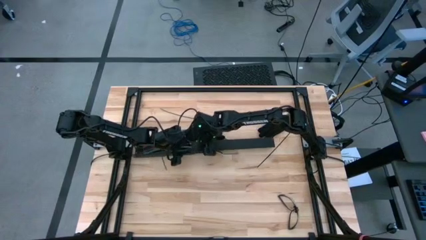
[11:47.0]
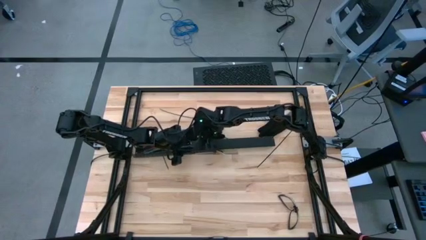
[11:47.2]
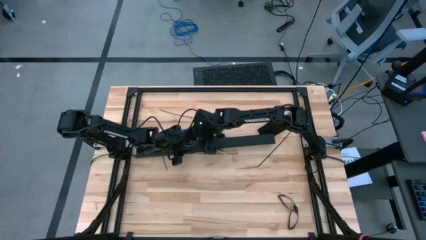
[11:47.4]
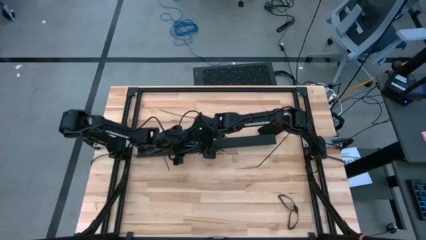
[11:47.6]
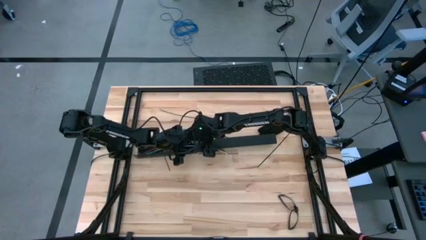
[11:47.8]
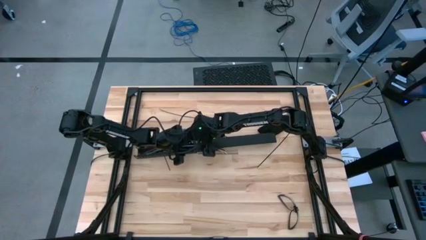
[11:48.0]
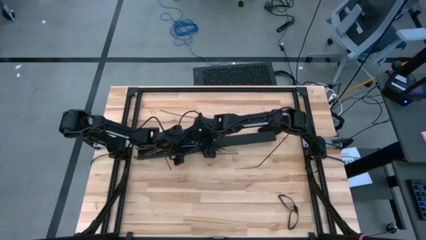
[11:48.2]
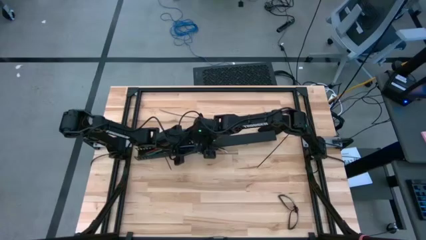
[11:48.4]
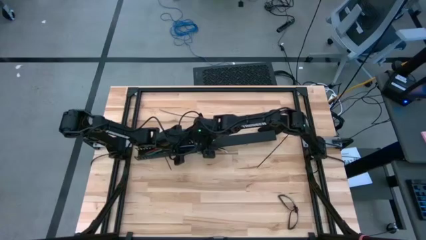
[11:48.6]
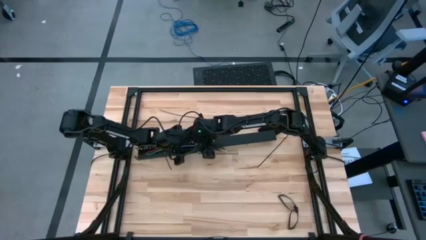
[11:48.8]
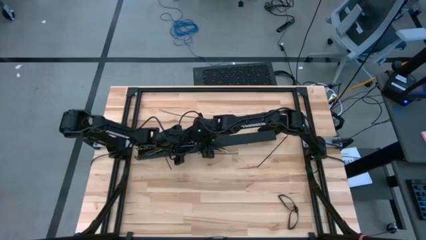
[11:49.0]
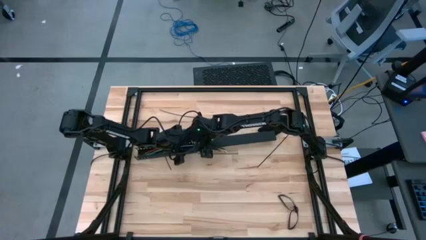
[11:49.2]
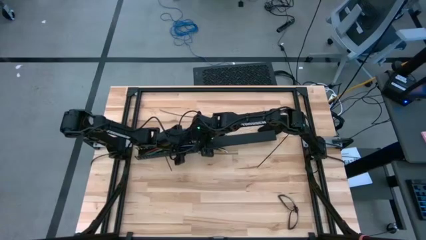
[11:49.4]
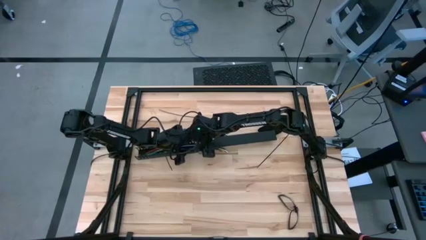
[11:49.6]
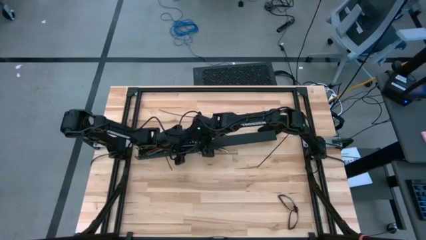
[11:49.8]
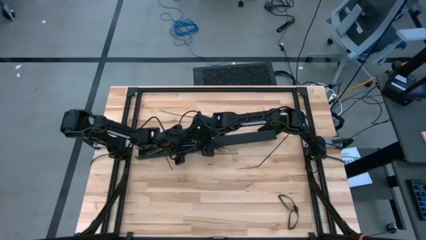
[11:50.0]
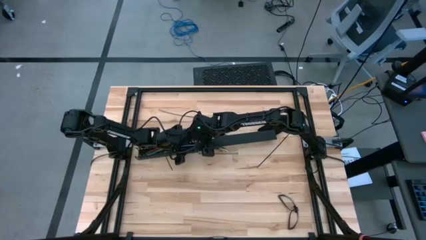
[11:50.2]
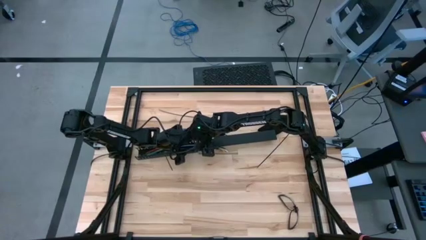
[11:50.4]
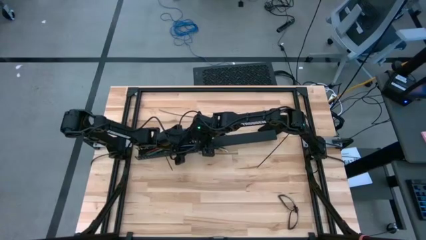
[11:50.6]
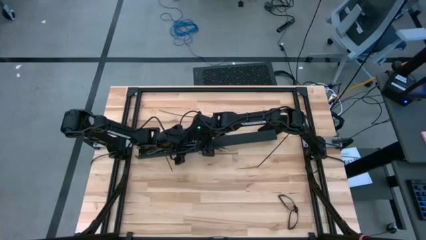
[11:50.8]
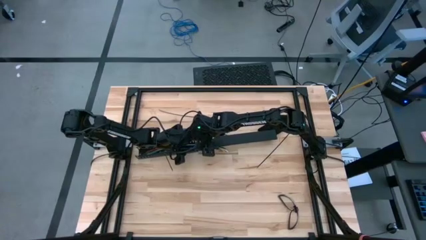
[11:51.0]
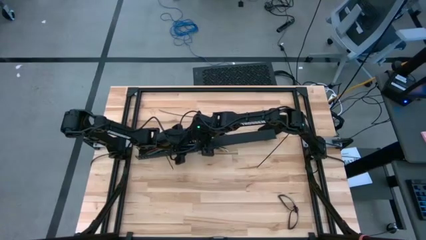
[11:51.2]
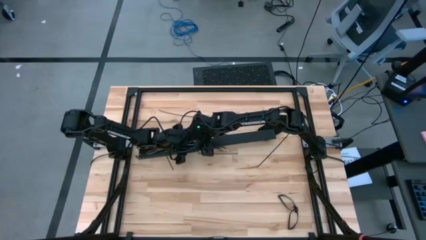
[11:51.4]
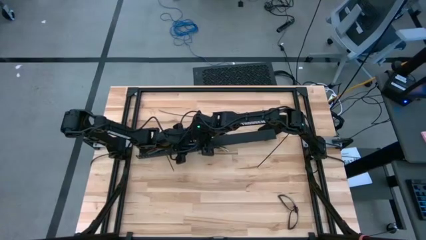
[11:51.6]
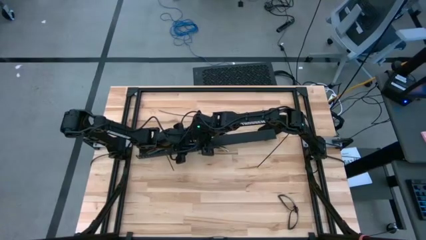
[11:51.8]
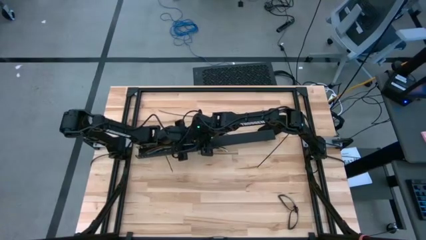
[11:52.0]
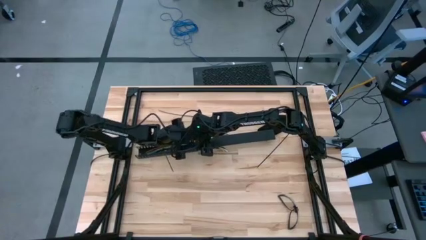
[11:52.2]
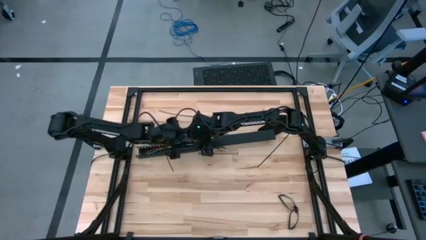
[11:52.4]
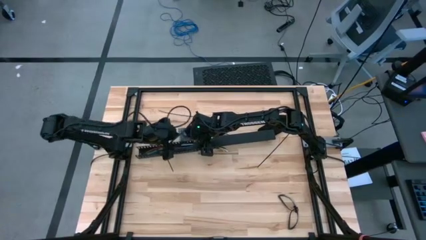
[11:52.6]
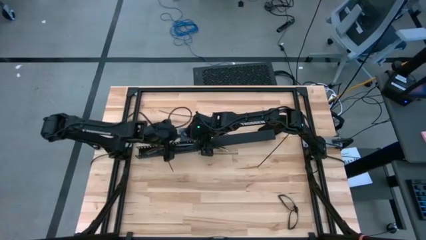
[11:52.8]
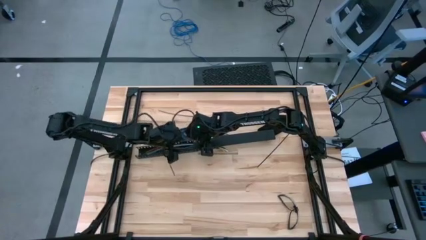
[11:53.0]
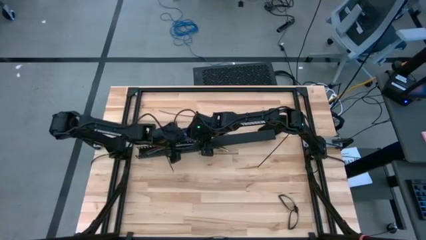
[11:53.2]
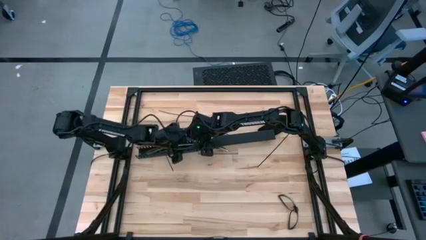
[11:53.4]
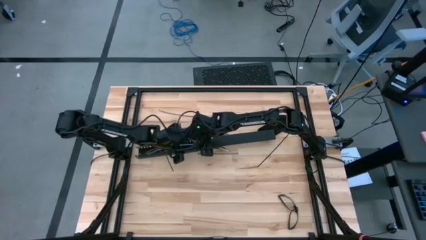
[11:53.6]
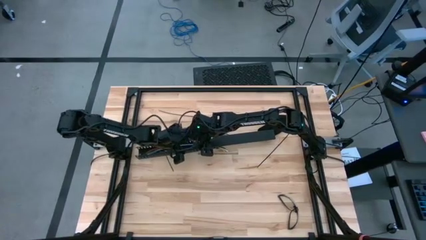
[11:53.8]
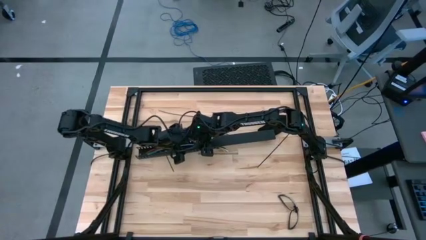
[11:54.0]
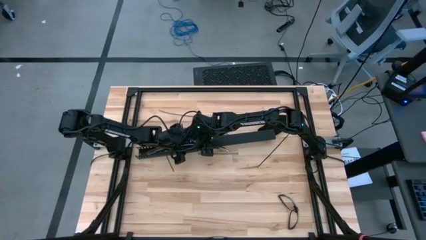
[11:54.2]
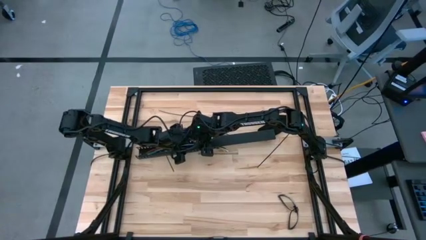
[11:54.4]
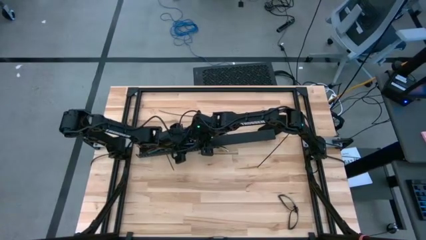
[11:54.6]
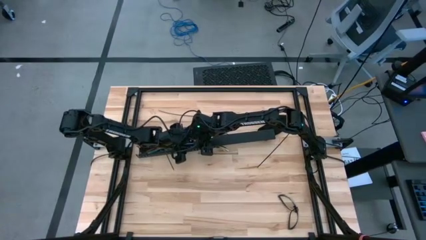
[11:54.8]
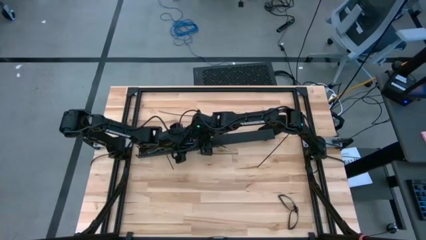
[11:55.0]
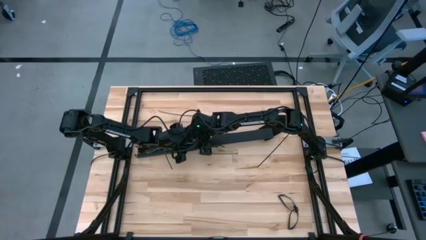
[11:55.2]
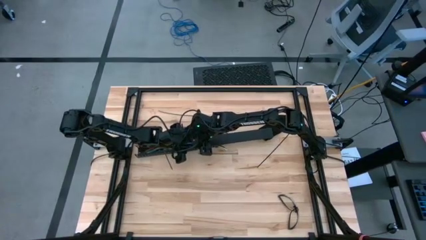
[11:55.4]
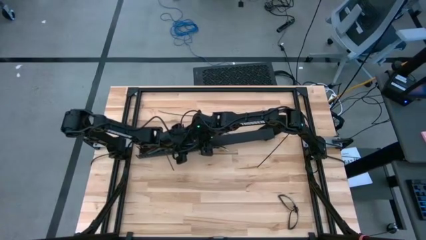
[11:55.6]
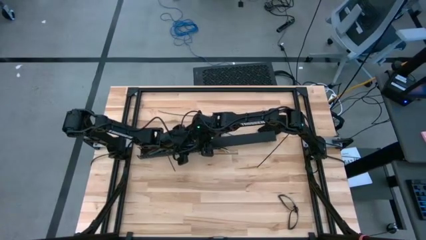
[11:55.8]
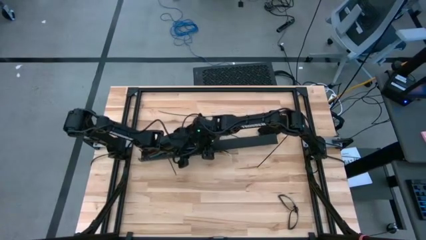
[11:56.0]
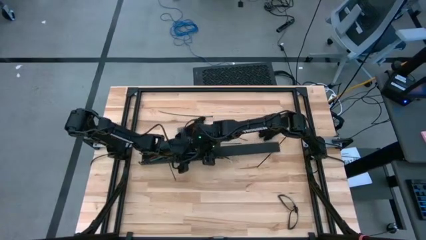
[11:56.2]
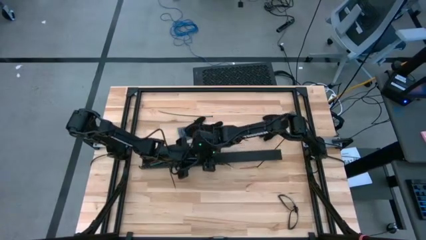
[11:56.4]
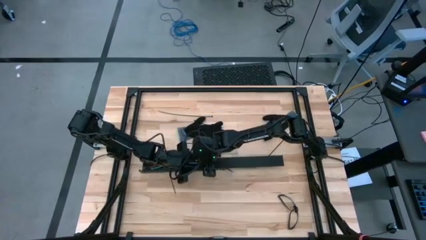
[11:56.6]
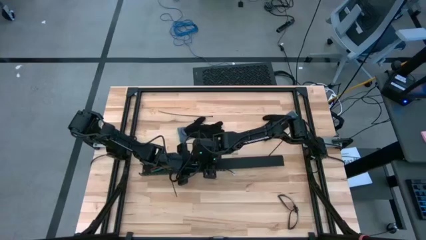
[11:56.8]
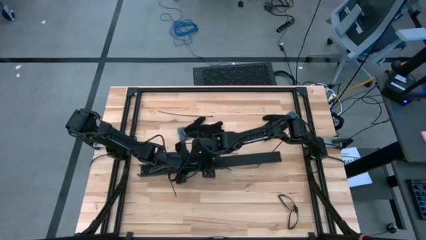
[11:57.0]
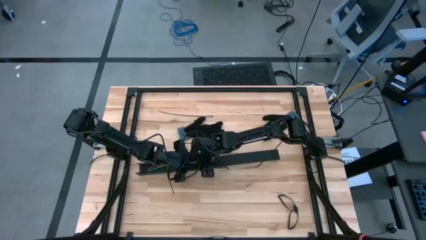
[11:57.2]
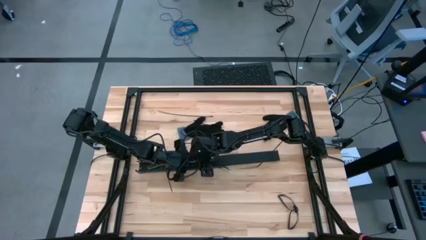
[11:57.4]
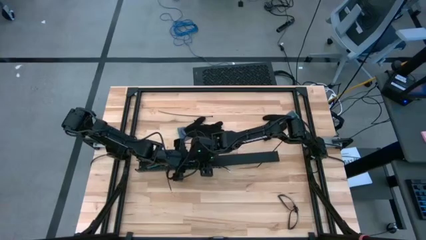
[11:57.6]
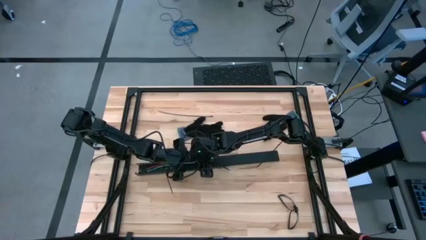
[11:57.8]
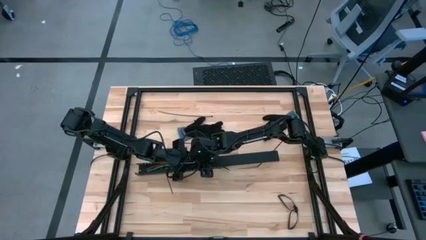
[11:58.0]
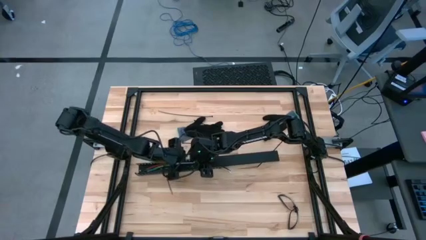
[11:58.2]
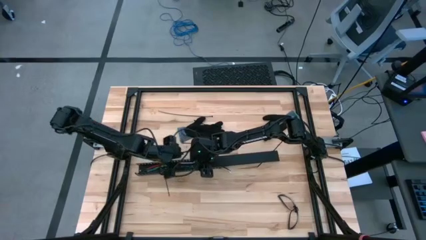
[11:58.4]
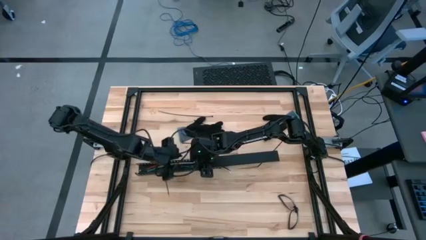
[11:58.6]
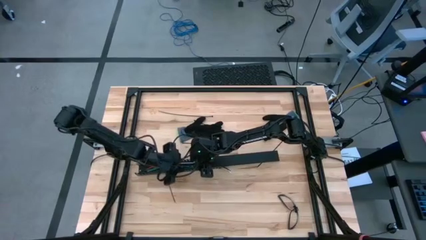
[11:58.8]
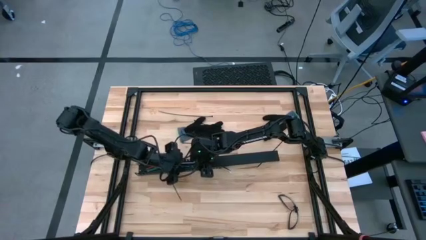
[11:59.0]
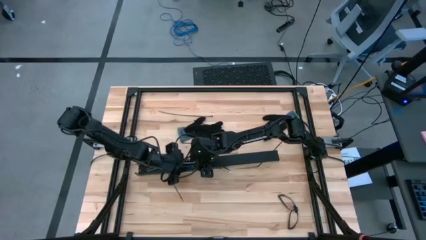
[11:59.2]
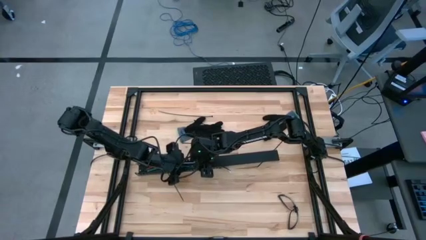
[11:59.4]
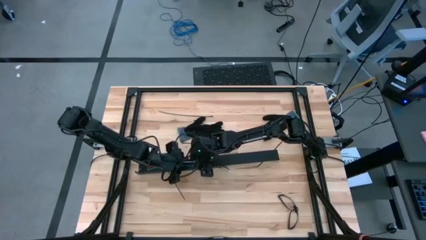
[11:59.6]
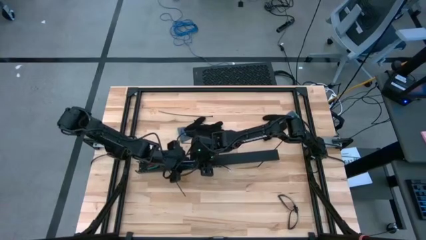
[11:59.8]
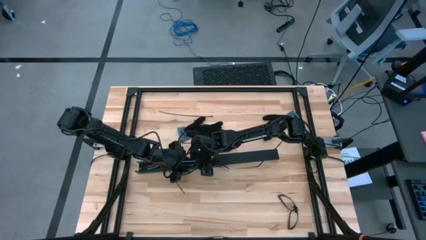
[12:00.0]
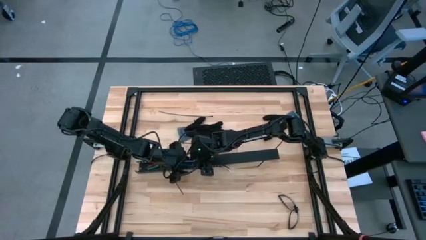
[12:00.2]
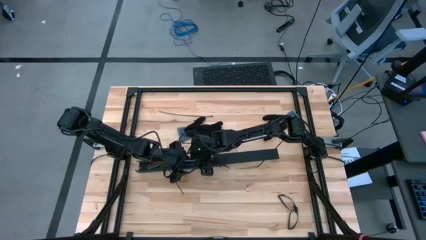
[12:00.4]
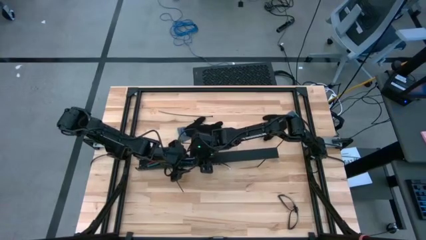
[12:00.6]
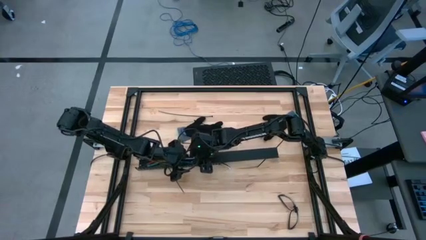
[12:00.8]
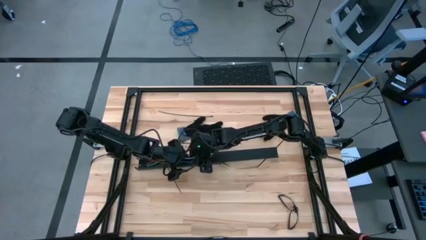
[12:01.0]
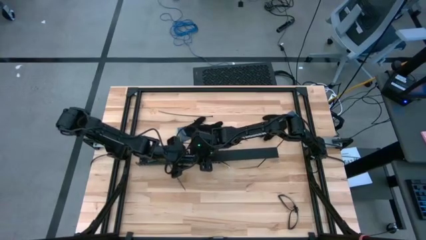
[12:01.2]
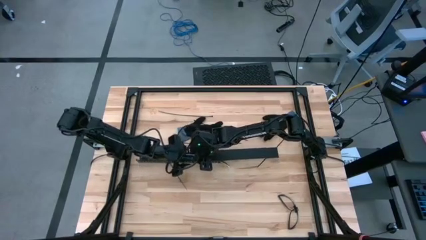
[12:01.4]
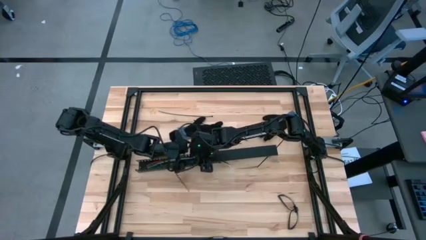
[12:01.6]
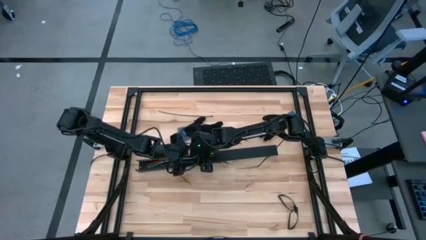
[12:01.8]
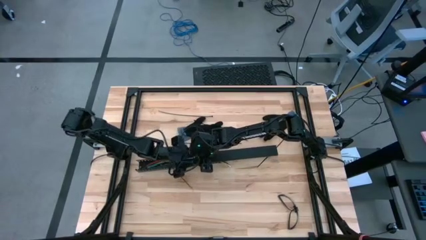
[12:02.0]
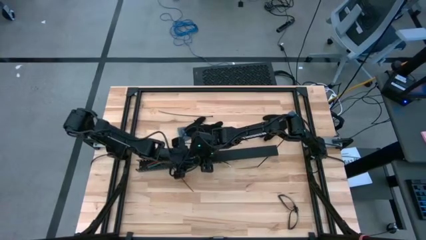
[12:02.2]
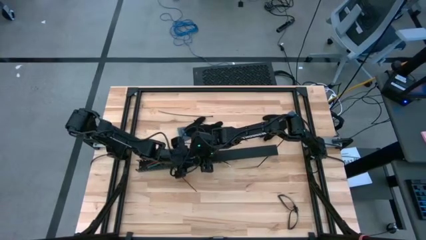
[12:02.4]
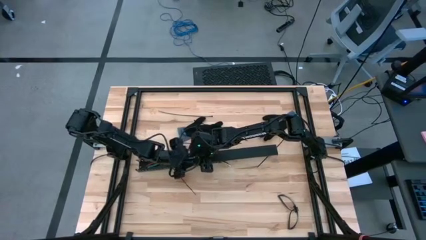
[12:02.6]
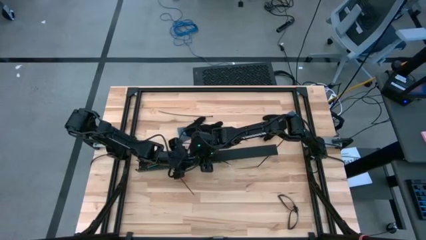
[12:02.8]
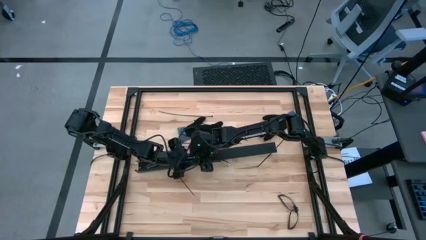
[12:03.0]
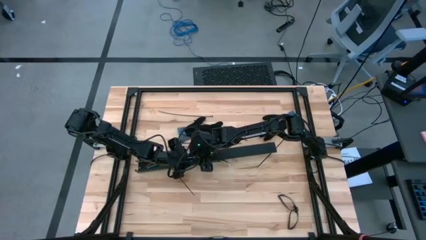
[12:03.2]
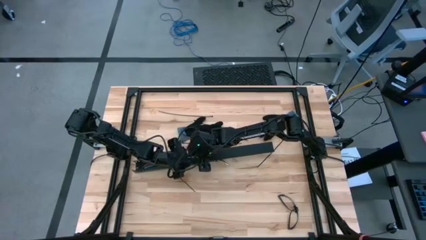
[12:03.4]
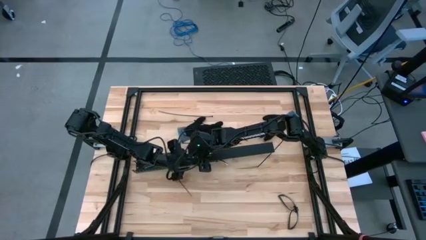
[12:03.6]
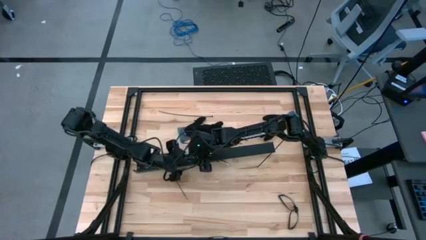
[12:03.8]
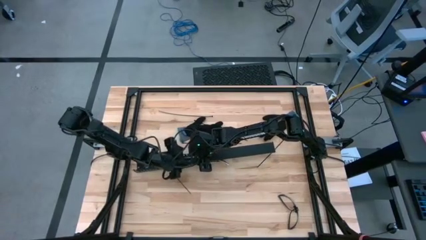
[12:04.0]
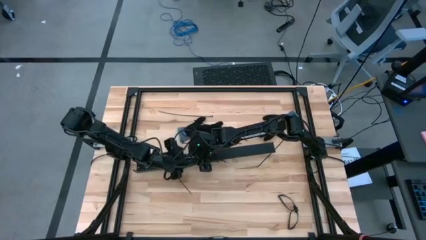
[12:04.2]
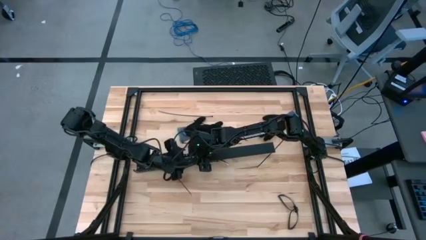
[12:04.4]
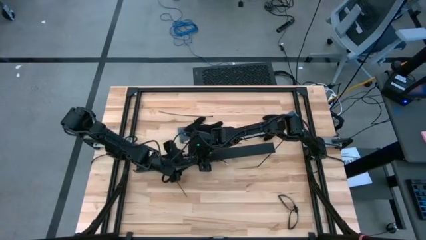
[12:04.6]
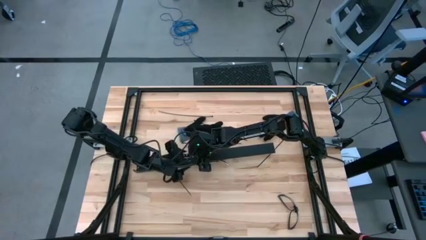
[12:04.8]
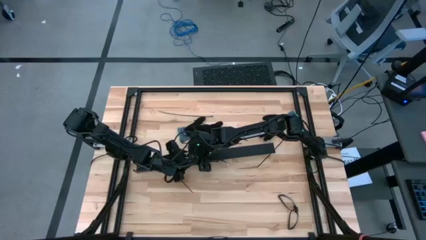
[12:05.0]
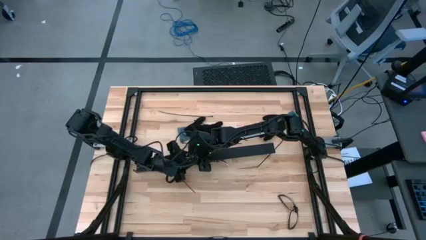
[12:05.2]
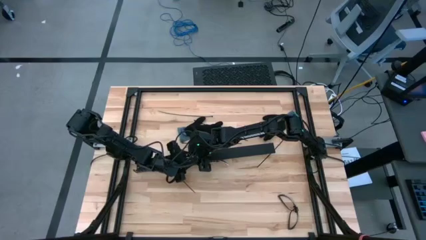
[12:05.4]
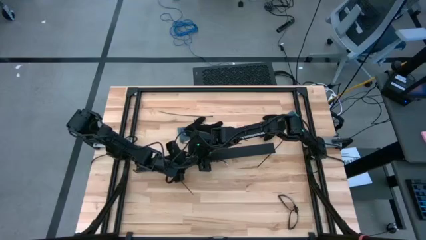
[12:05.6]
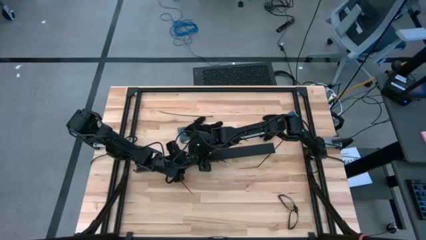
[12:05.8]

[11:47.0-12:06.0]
Task: Ziptie cables
Close the cable duct
